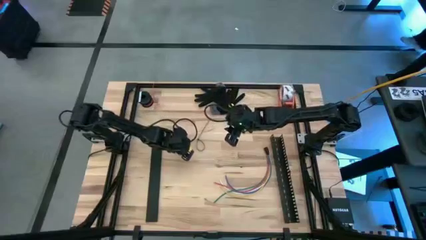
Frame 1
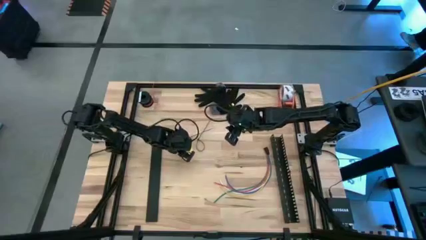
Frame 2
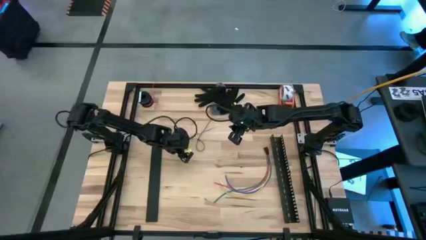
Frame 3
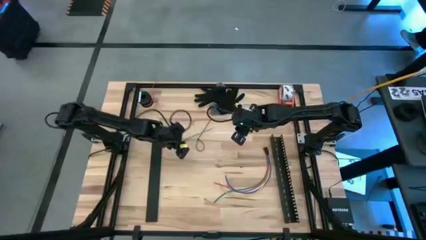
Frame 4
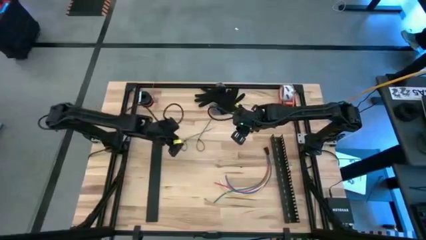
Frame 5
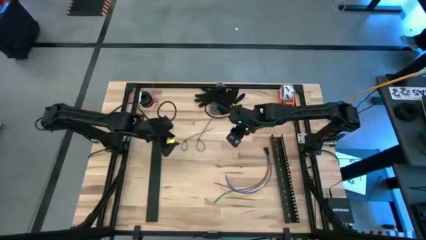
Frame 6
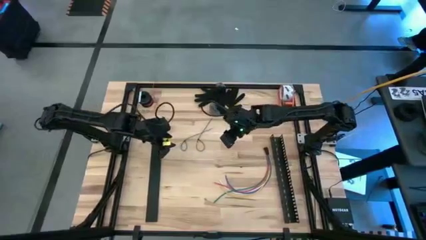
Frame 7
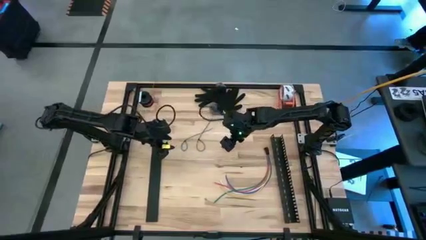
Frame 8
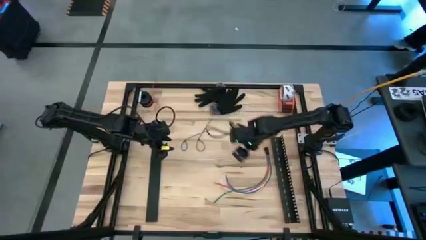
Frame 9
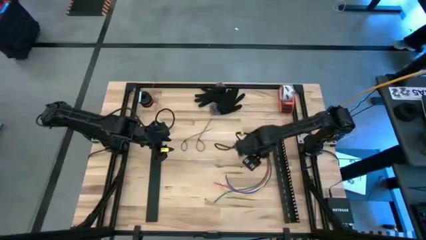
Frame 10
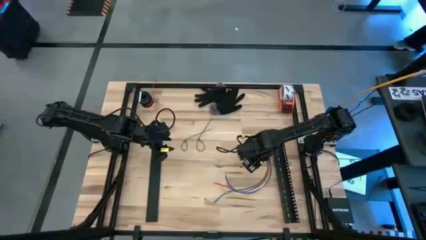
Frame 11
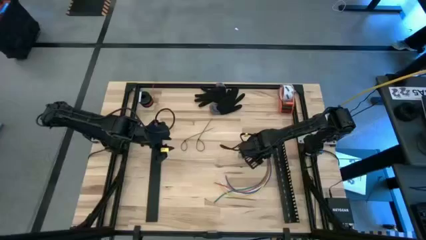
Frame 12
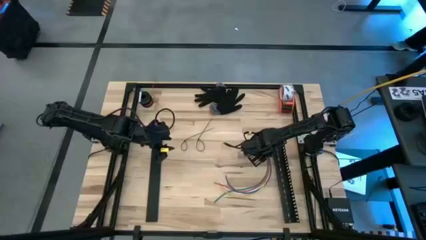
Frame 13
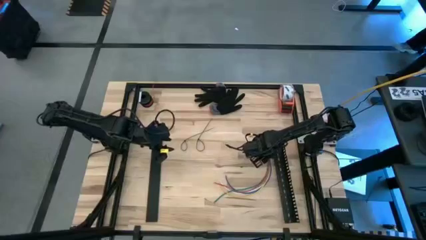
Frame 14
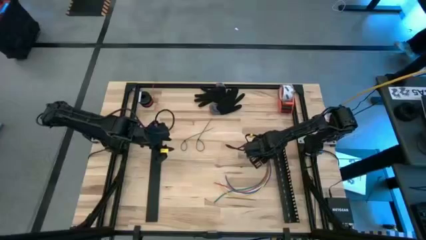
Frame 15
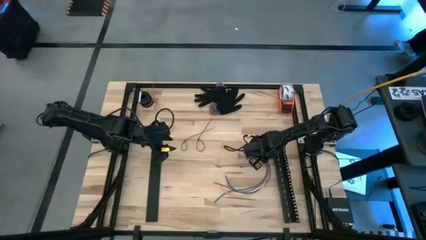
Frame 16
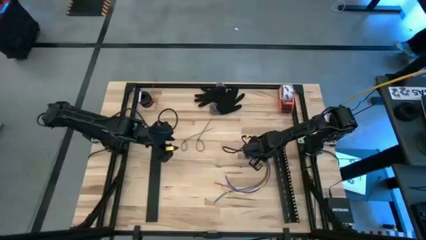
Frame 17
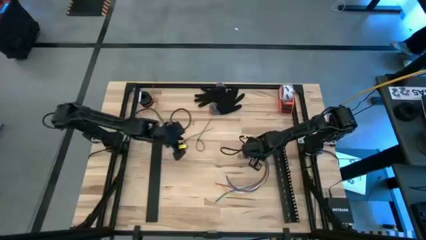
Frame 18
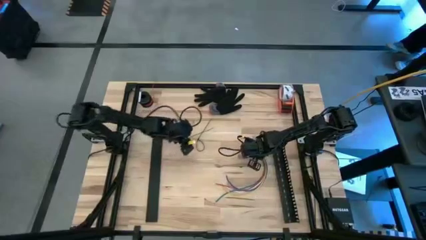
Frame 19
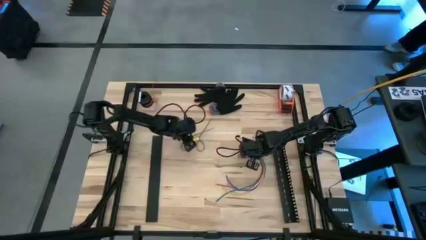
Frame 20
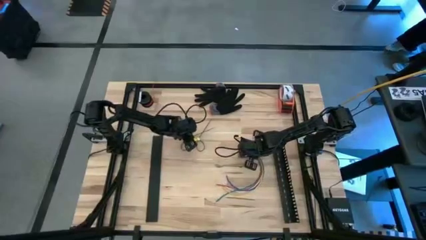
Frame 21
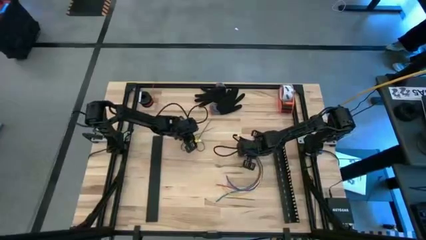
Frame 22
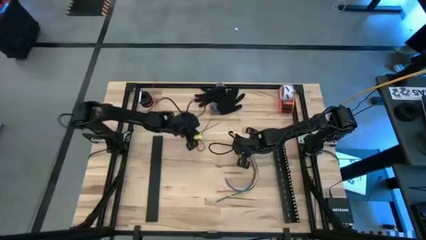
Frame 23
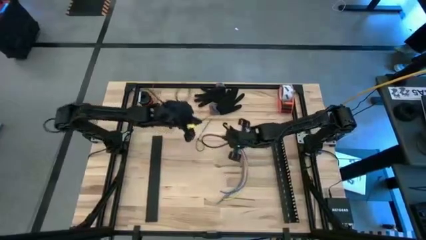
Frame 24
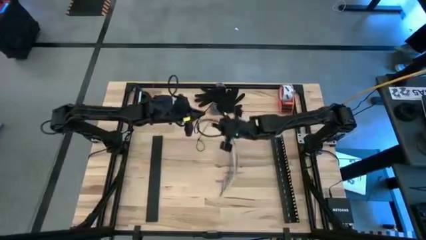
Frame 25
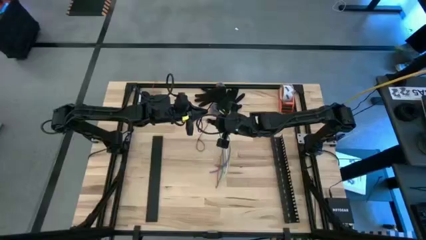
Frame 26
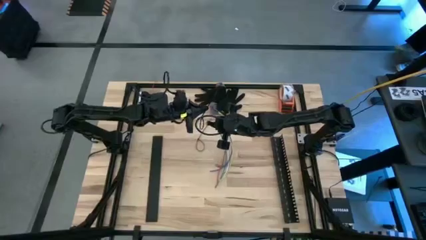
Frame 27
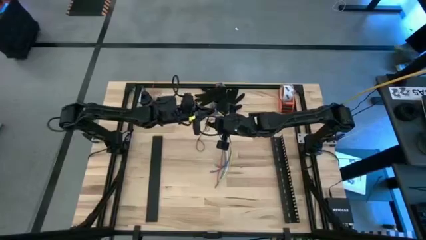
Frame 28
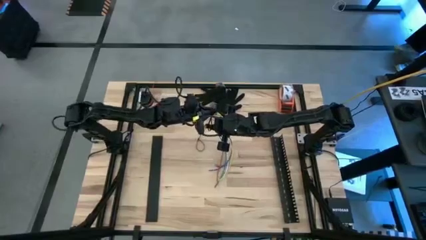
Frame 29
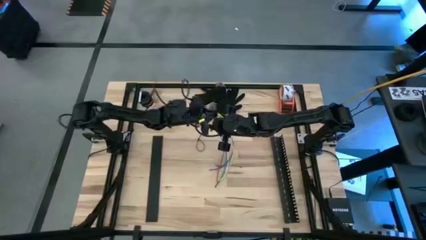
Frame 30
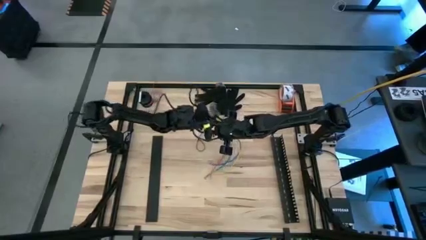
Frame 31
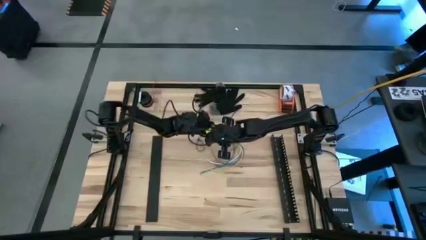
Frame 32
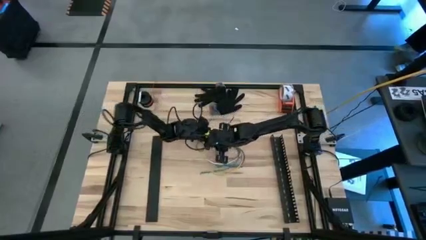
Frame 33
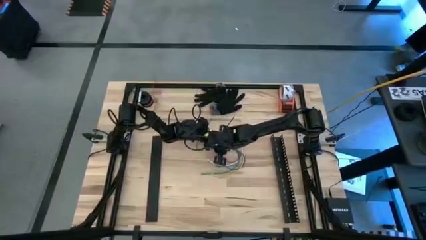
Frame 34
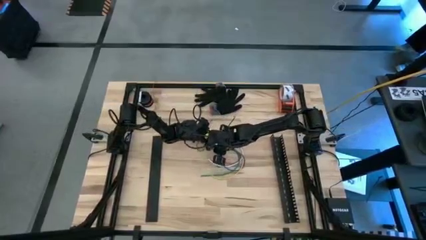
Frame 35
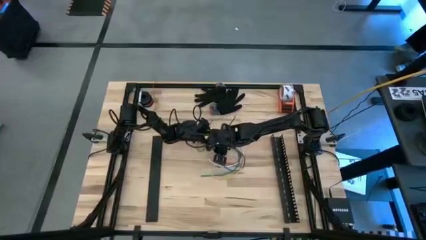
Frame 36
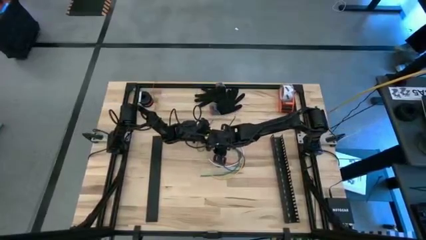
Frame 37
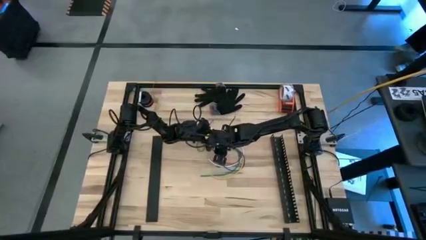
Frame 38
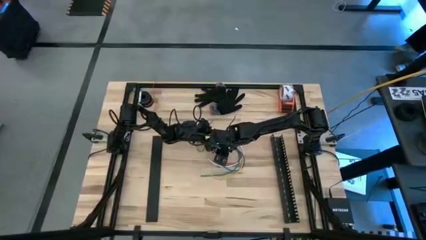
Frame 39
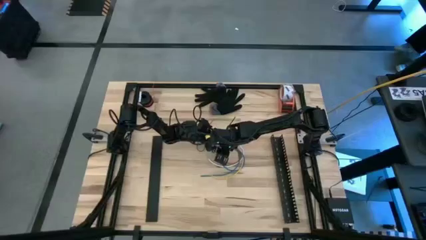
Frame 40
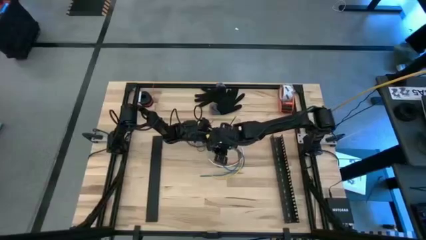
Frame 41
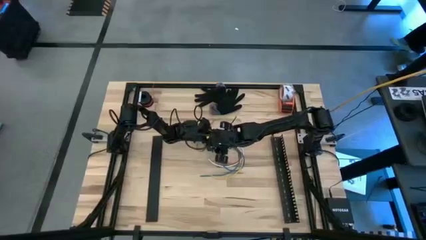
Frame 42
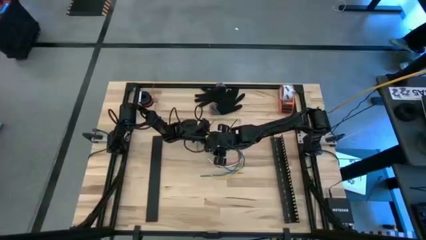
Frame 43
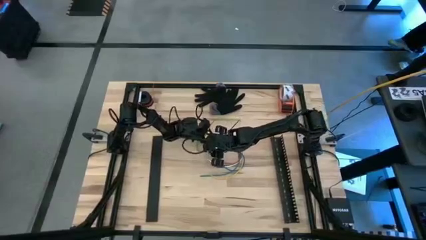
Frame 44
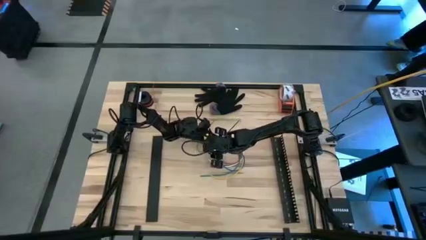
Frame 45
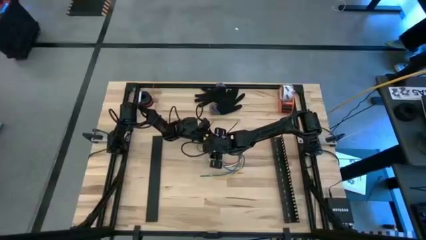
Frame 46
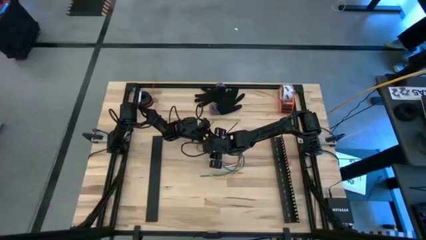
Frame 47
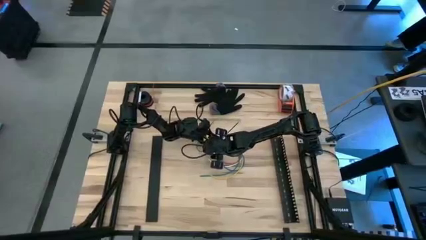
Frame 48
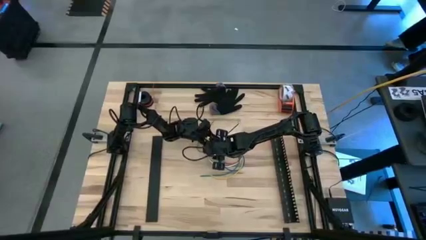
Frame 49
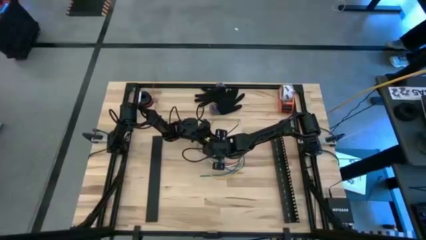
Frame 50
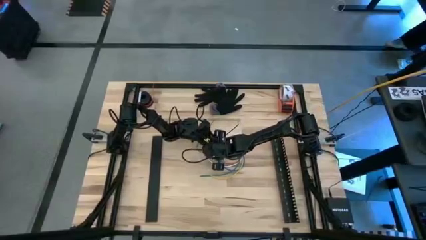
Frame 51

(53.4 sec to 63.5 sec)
Task: Ziptie cables
Wrap the cable wires with the left black ziptie

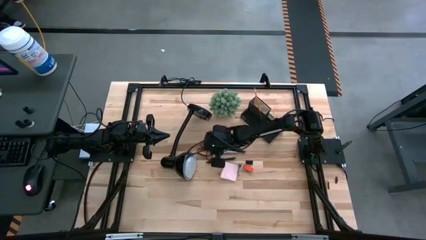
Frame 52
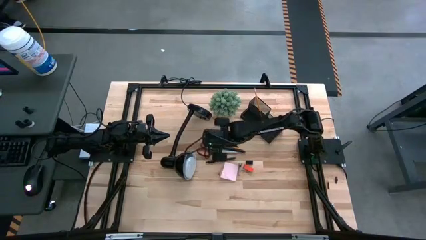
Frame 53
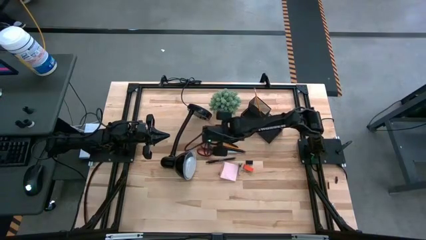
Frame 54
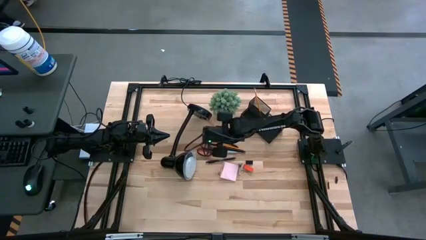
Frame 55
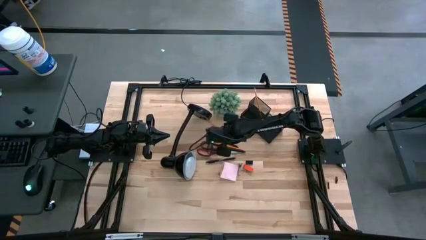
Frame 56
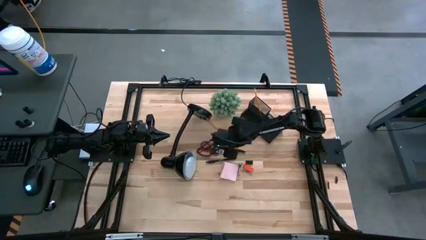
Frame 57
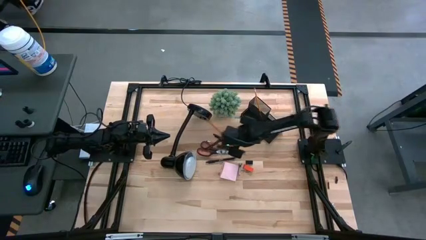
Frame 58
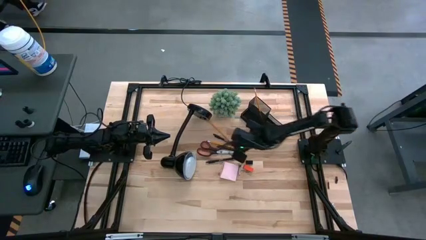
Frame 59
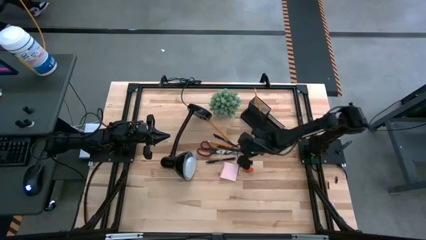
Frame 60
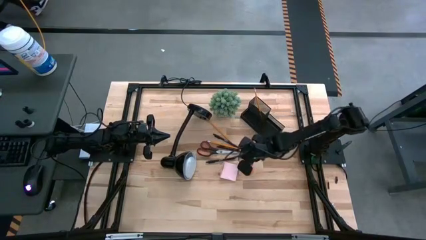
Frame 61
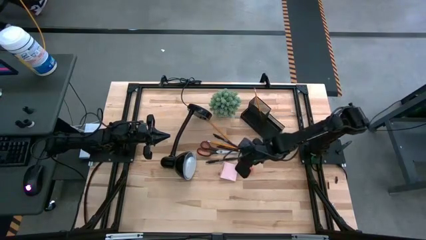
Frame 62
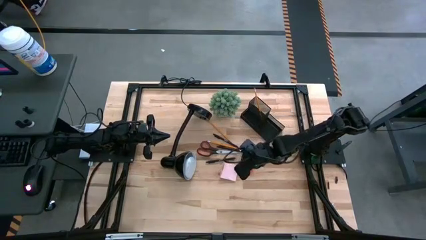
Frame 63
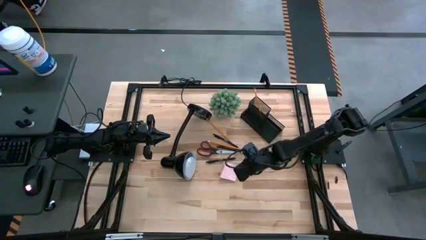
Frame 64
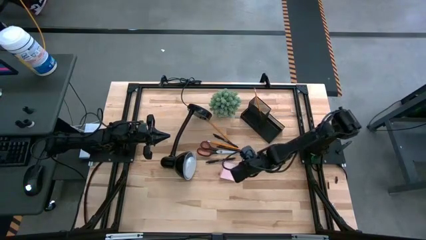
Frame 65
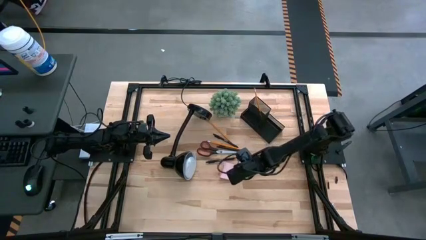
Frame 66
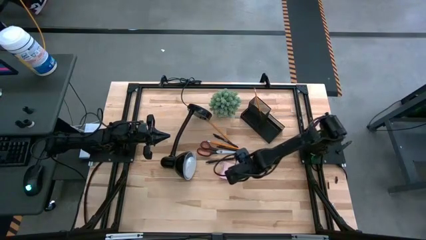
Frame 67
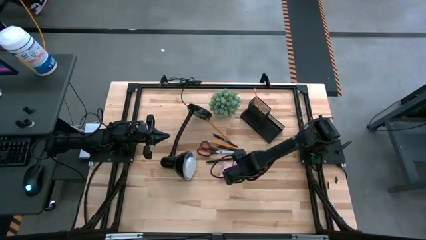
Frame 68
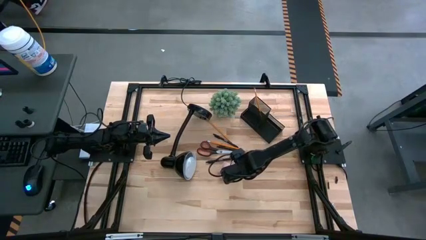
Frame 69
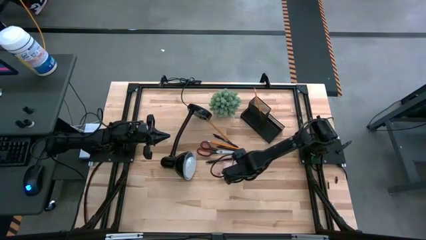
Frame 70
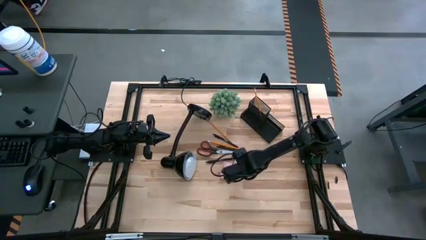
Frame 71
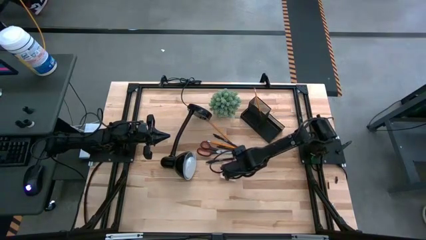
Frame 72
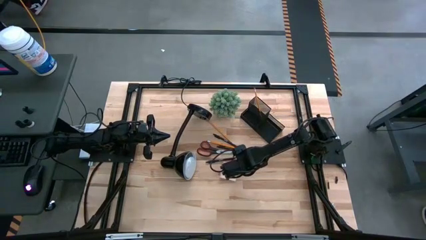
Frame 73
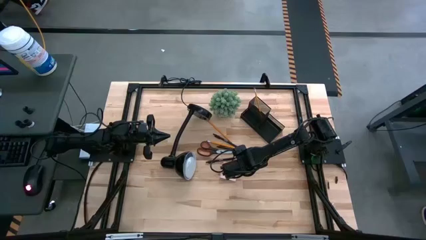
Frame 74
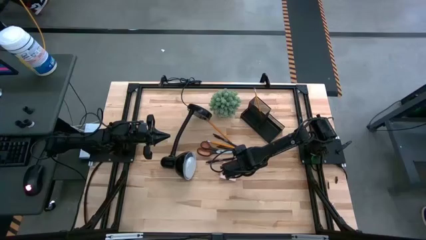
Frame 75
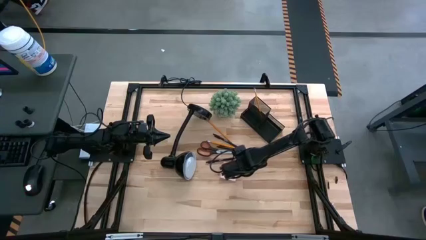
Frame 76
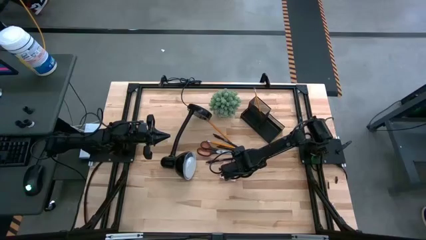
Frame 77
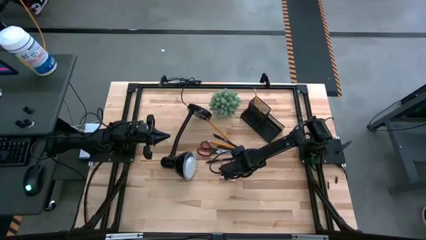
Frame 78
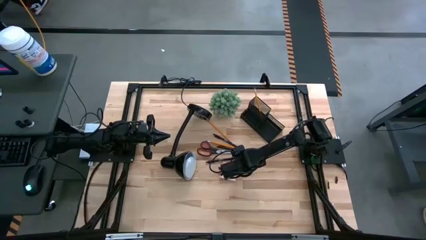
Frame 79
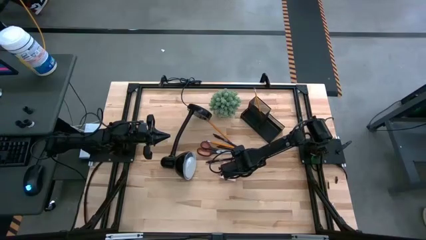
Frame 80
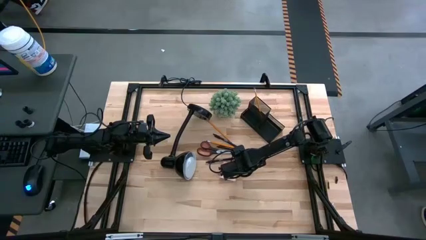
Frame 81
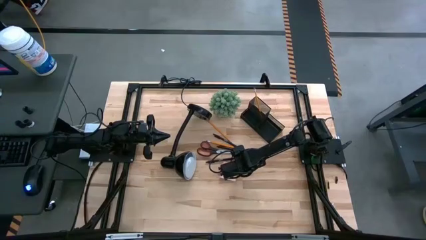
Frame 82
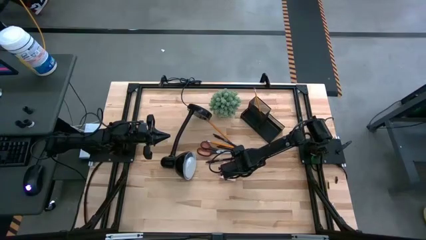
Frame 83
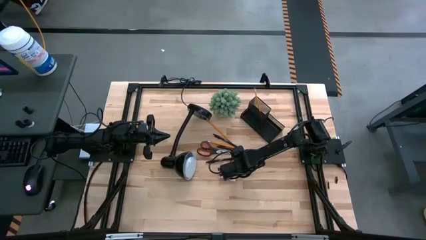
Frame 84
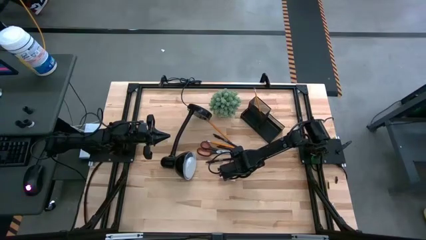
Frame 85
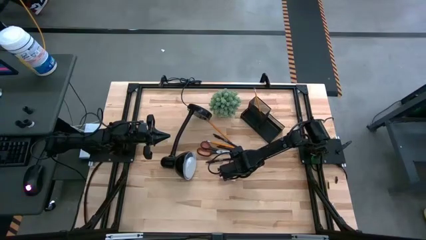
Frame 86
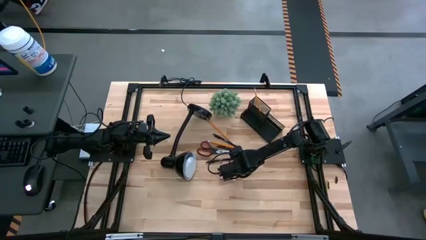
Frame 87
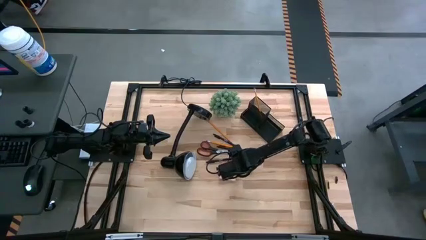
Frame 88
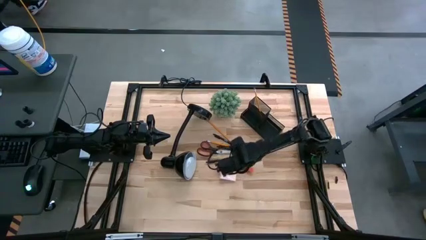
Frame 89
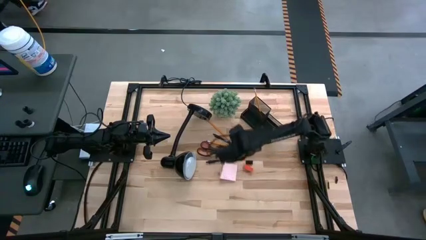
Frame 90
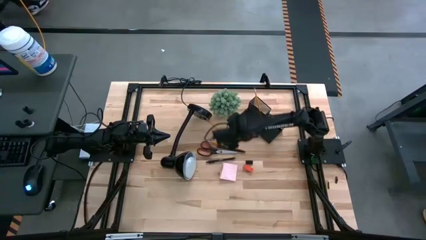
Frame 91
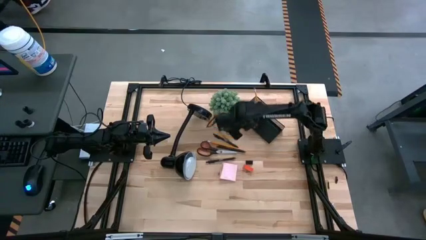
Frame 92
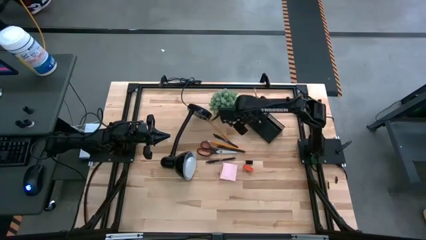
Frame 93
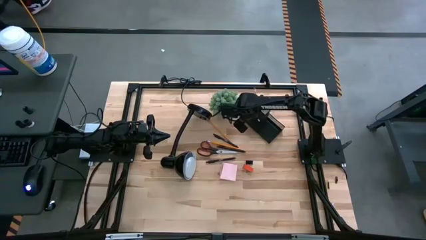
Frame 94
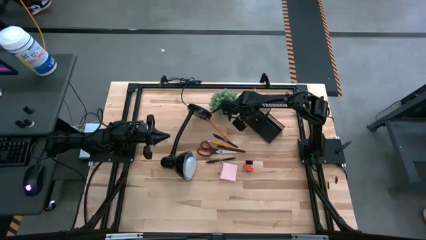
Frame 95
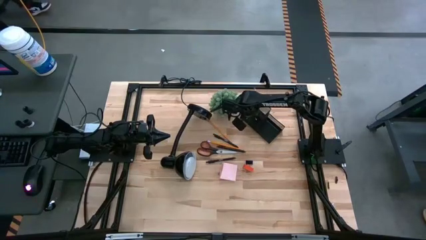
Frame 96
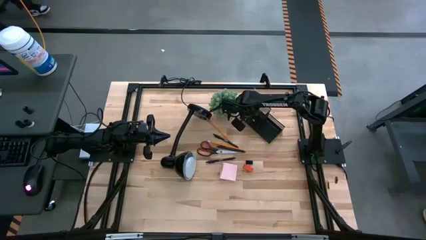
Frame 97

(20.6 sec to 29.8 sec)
Task: Pick and place office supplies into organizer
Put the left binder clip into the bottom left section of the desk organizer
